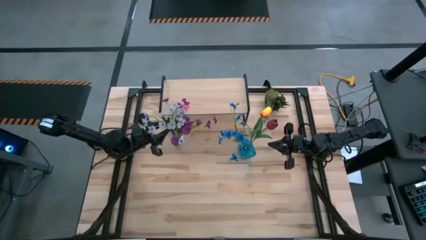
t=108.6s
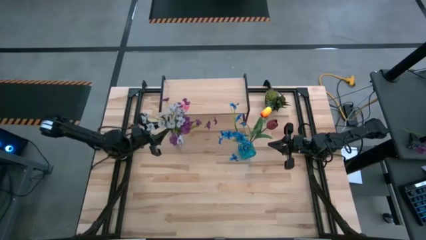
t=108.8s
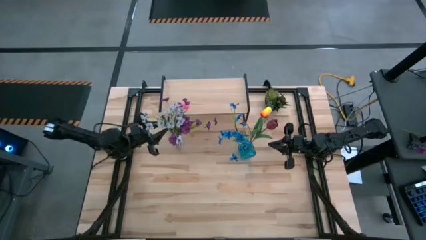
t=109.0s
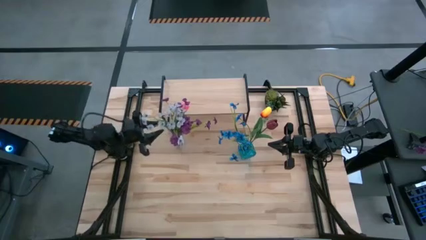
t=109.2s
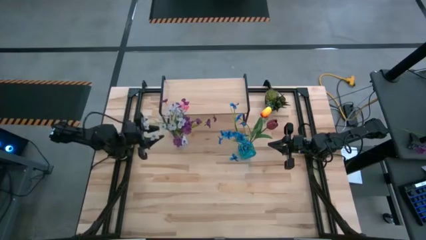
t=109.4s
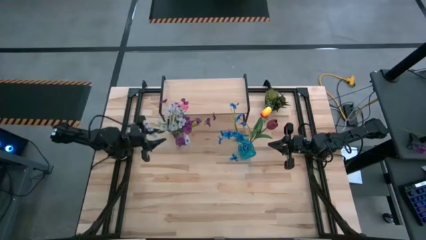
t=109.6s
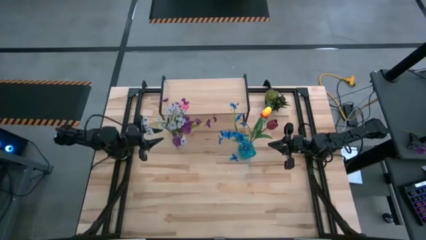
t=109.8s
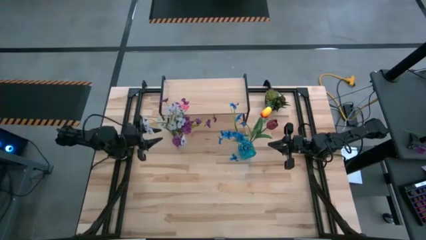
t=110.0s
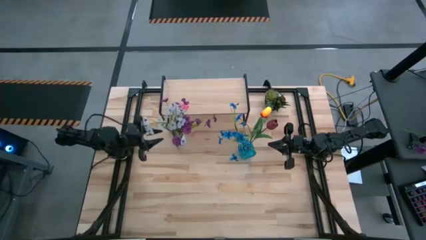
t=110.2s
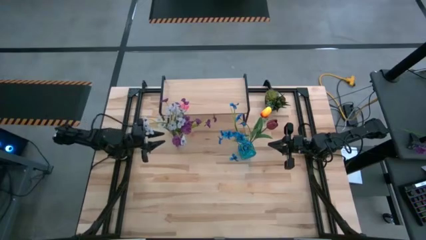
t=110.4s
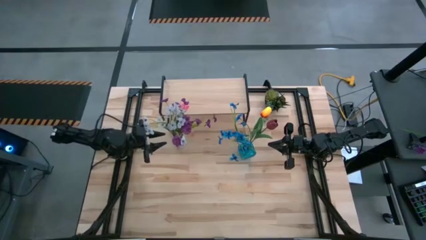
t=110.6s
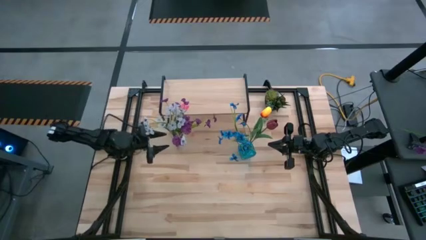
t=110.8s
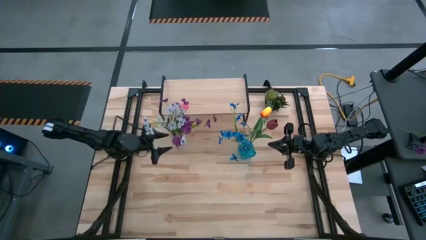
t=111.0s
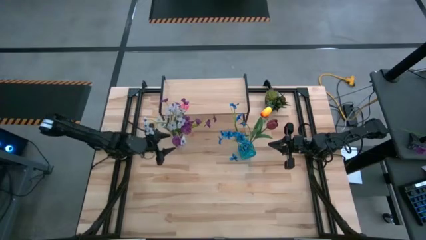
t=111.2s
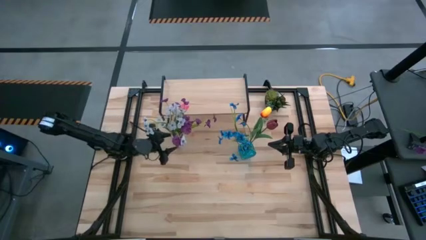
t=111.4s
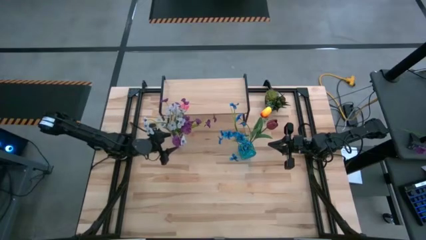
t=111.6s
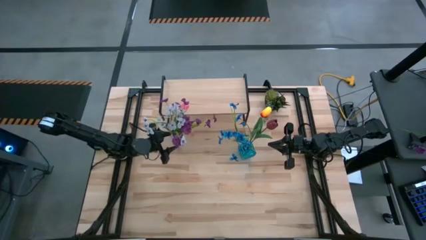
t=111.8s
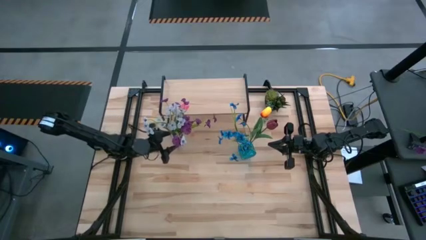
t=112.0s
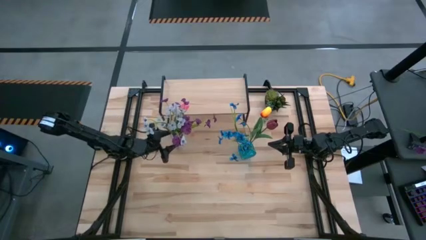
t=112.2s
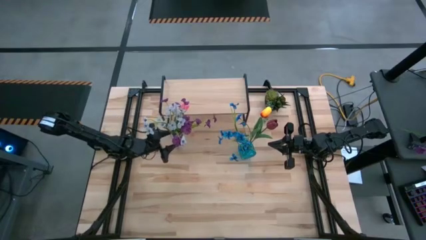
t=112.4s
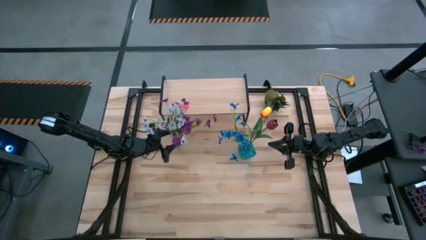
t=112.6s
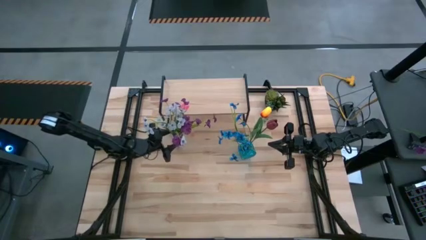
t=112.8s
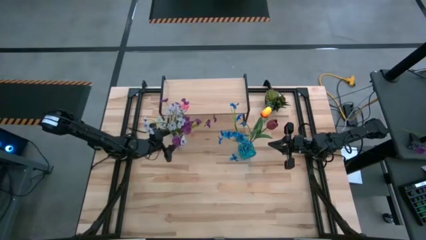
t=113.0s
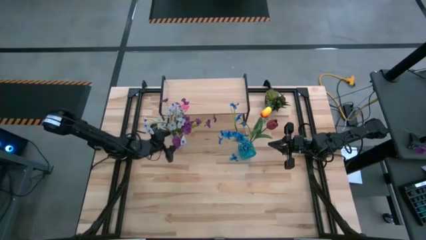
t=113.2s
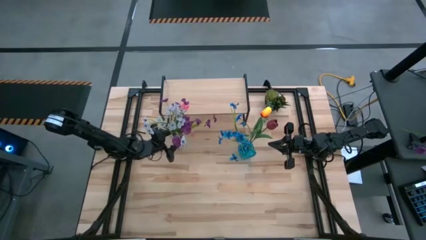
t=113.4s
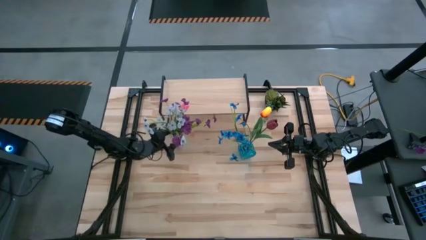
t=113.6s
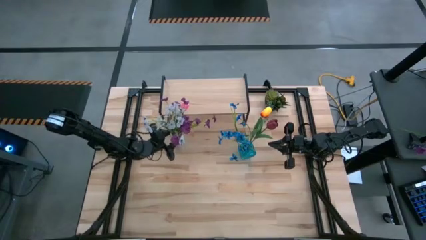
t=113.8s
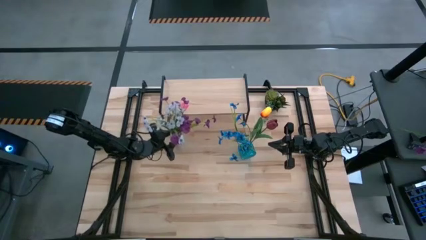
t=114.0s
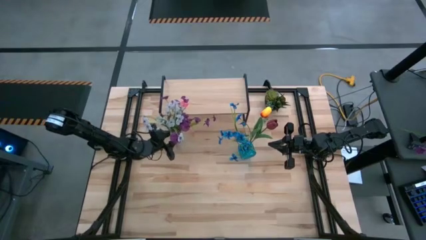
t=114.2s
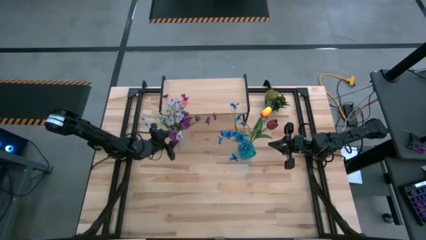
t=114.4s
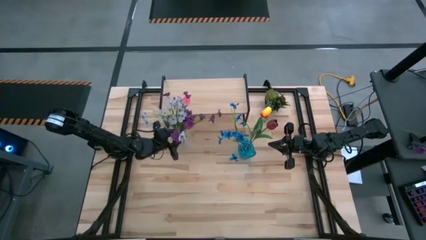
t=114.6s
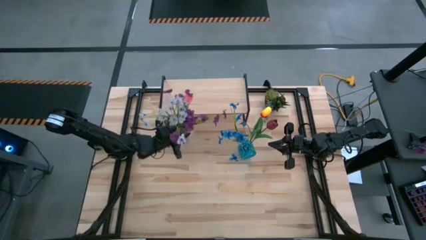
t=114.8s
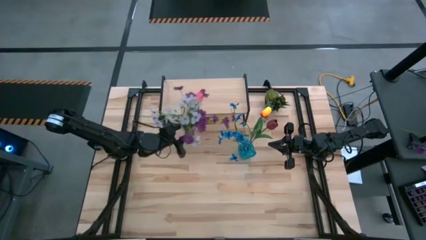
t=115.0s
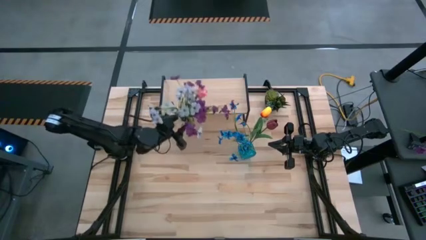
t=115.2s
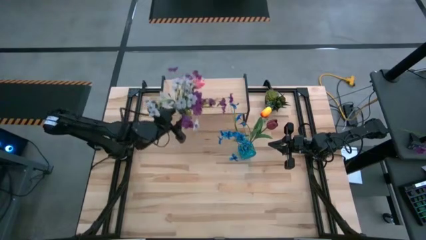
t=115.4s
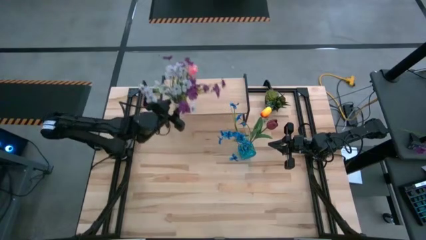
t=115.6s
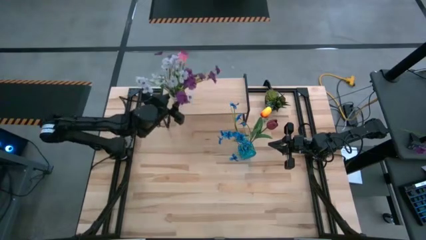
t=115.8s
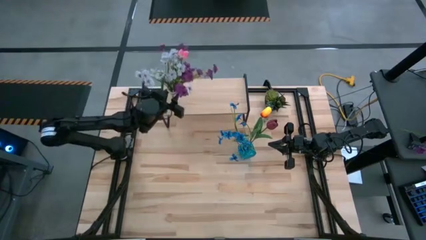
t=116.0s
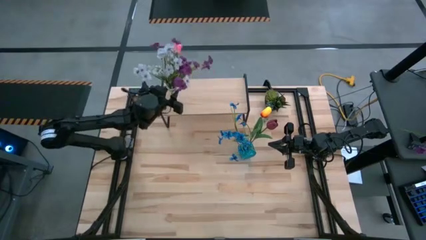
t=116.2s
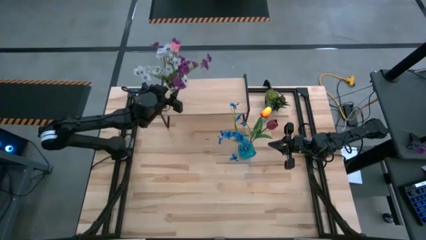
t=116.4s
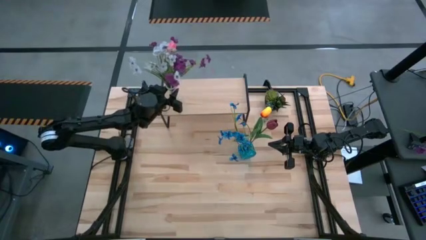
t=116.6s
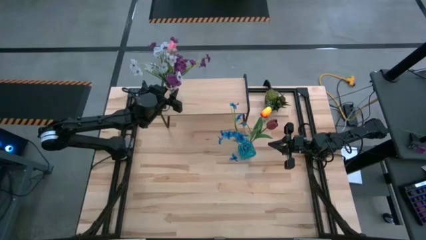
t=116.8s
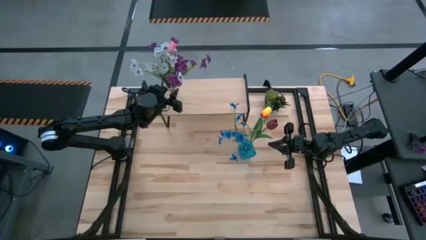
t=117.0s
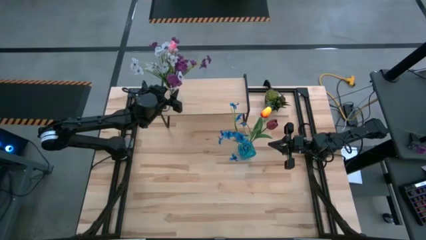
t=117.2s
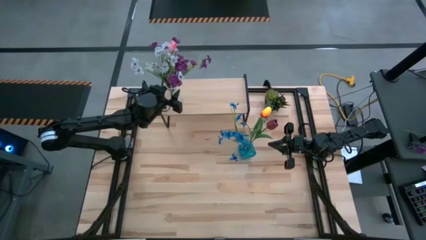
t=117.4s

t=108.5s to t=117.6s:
Task: Pick and place flowers into a vace then onto a shelf
Put the transparent vase on the shelf

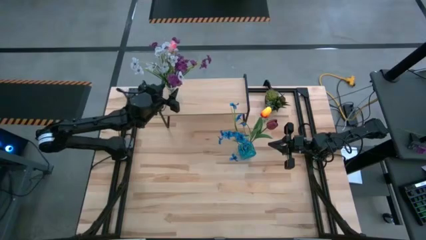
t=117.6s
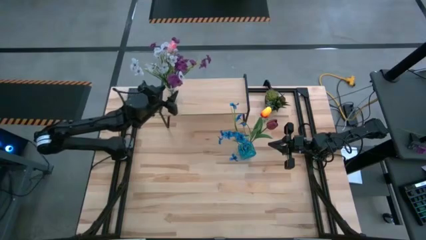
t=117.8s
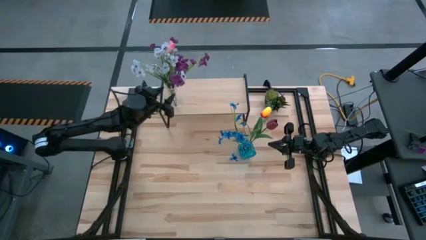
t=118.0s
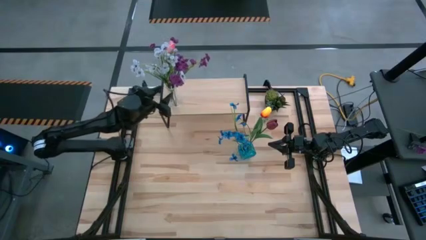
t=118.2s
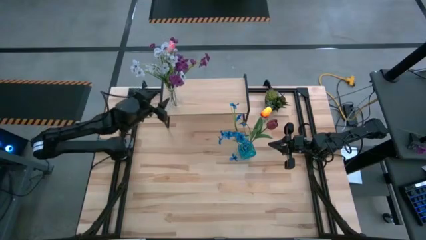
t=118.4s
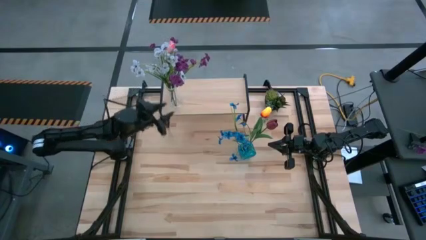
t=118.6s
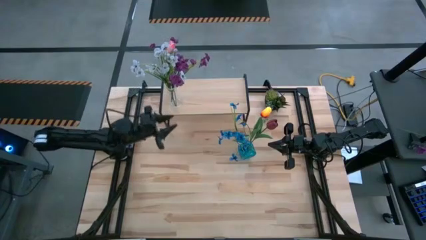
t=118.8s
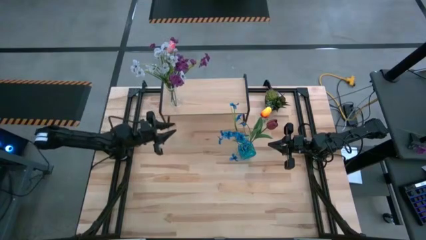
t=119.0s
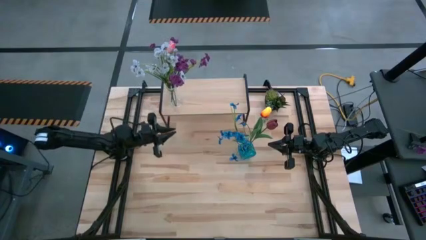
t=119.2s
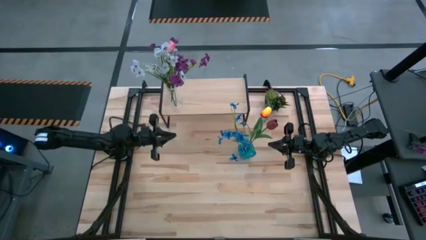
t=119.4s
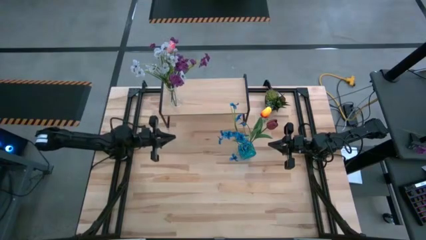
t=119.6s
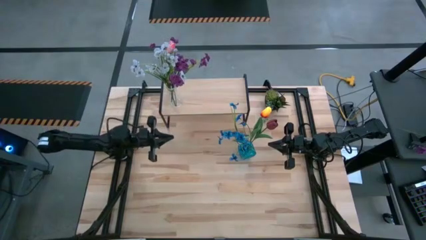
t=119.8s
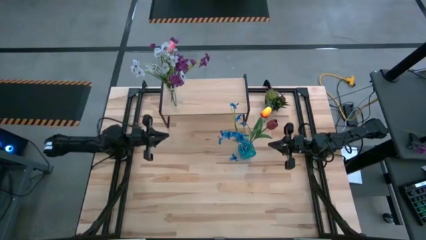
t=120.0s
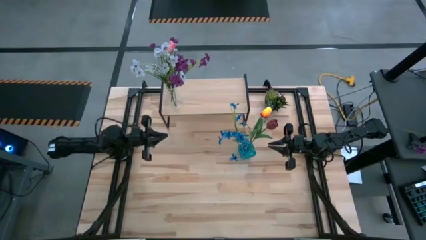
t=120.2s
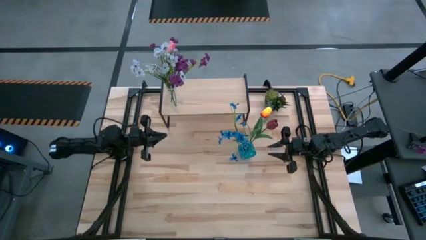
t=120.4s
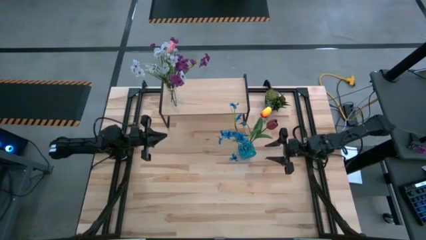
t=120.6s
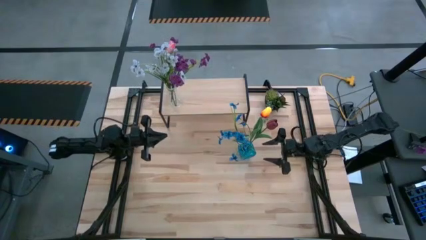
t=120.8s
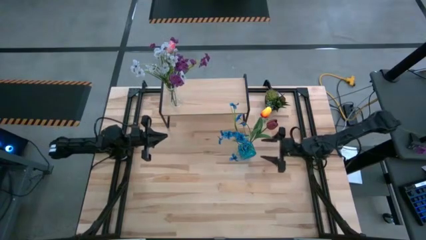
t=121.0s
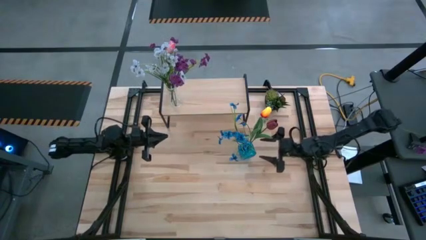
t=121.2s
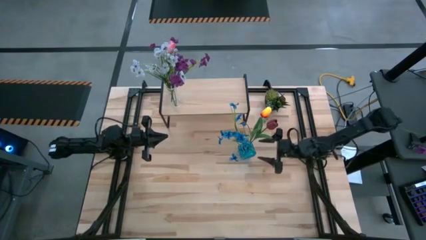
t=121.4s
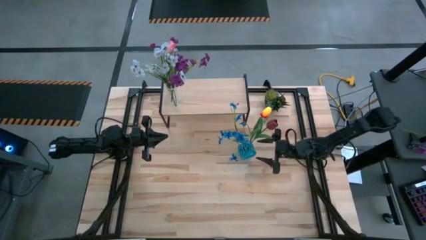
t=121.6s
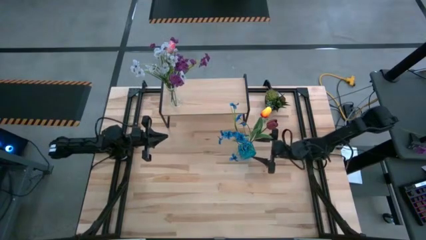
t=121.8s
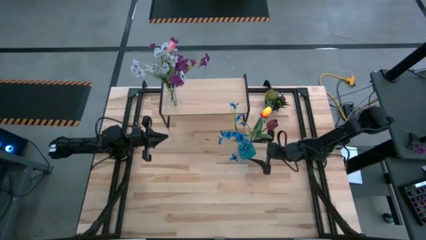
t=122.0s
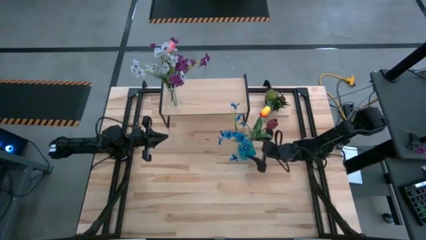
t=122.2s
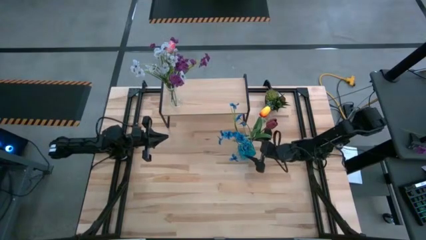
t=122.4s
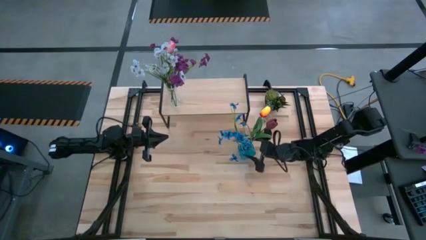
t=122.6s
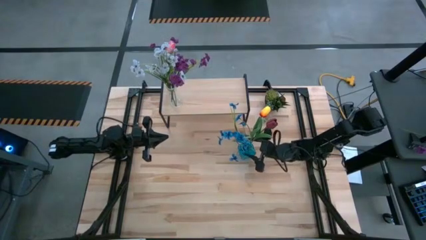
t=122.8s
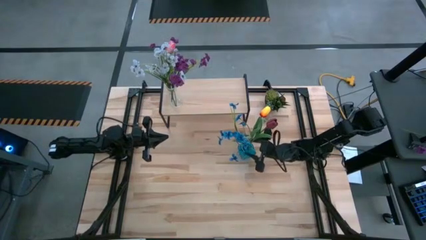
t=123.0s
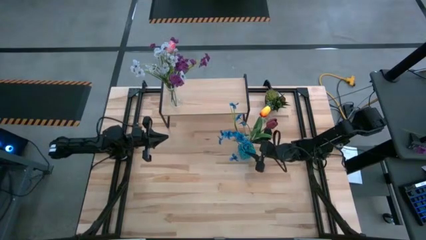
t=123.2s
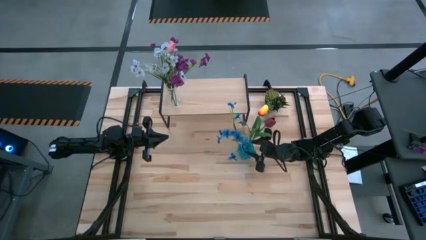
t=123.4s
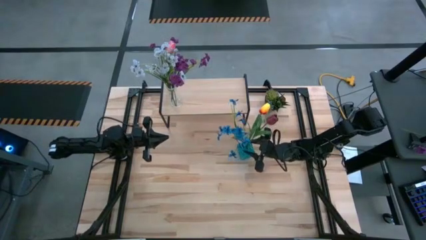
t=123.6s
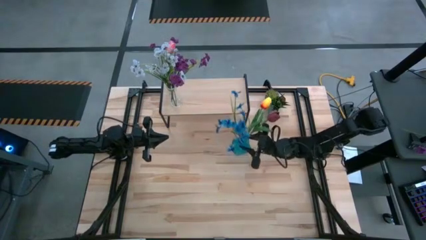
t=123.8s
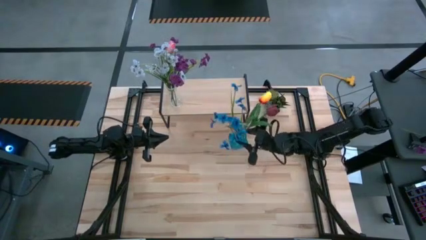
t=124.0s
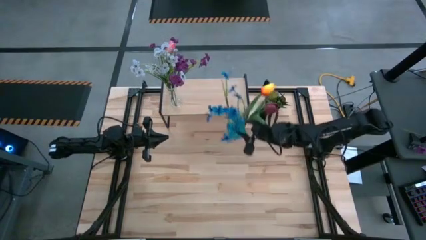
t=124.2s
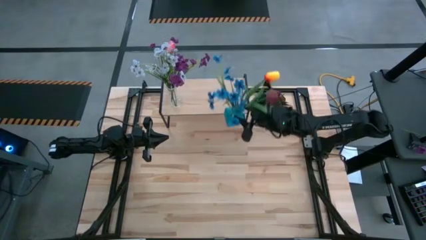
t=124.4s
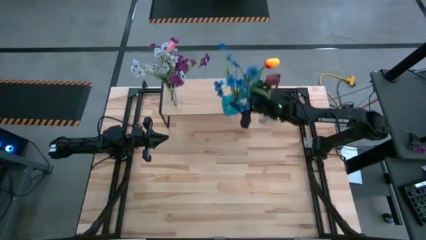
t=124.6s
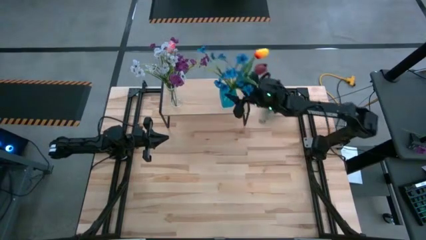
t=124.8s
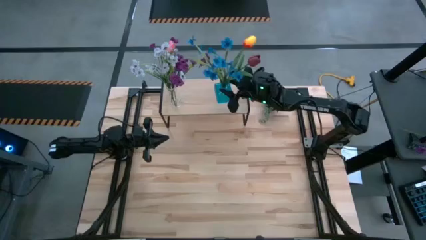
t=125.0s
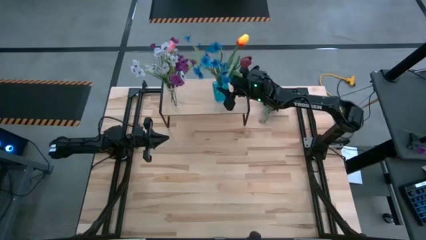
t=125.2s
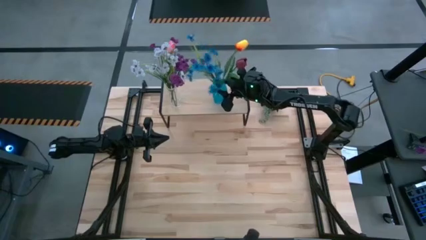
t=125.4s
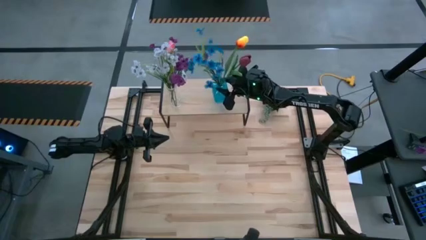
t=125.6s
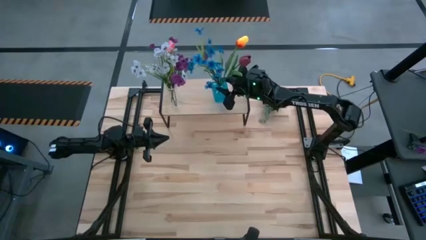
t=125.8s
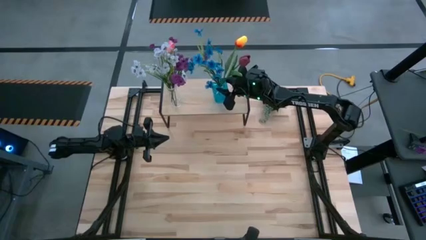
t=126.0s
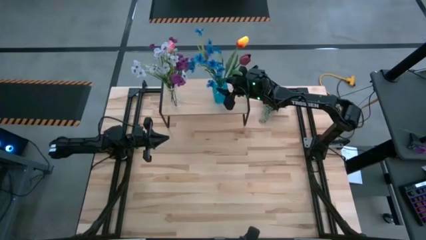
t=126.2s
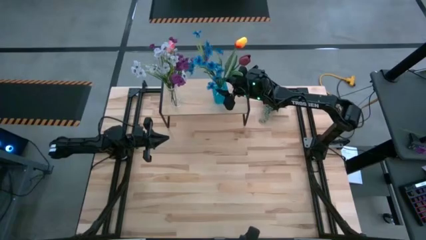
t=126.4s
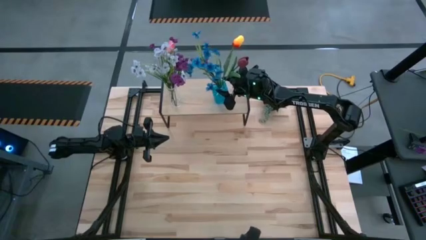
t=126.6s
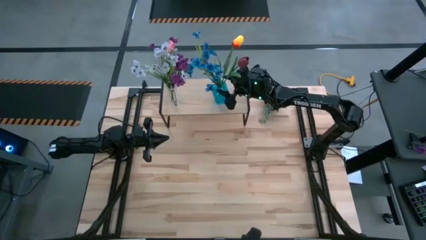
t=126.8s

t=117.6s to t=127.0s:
Put the blue transparent vase on the shelf
